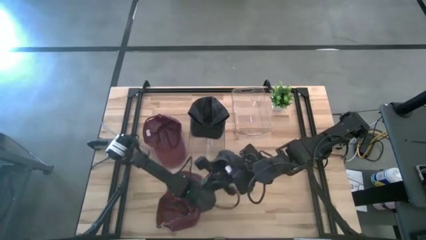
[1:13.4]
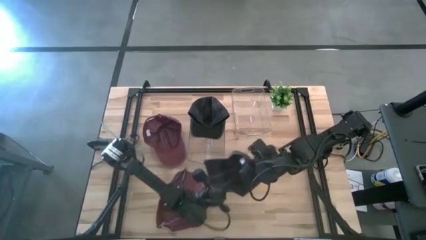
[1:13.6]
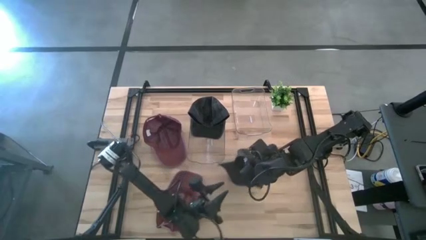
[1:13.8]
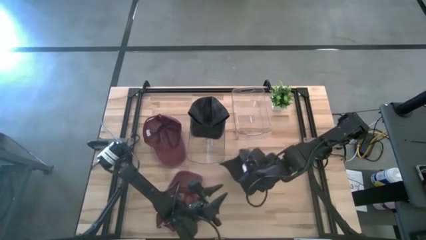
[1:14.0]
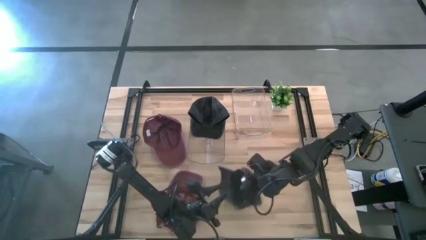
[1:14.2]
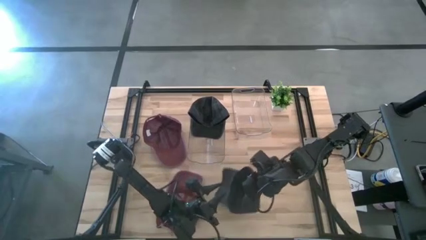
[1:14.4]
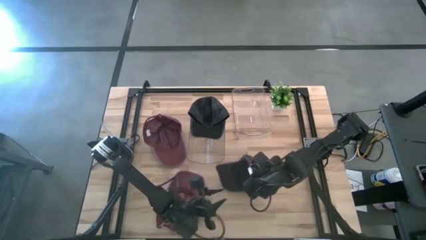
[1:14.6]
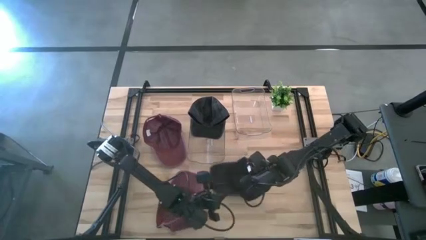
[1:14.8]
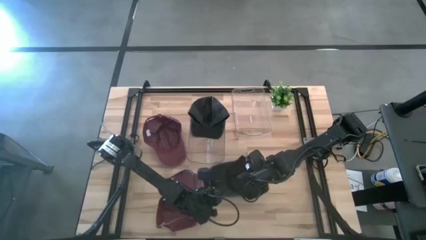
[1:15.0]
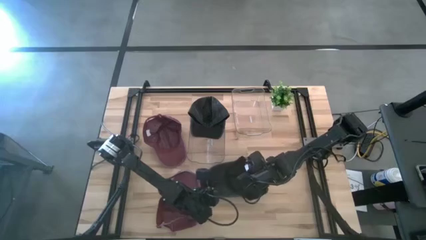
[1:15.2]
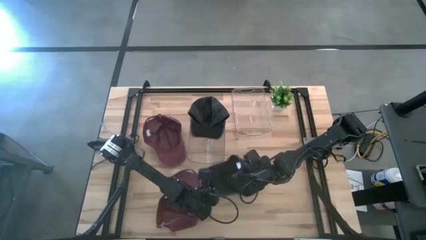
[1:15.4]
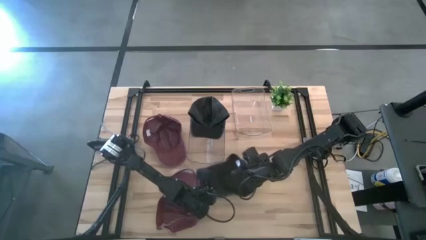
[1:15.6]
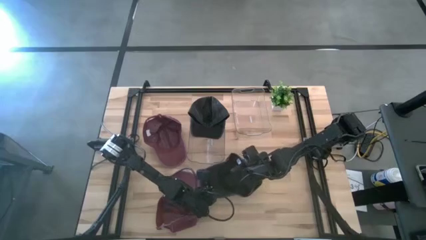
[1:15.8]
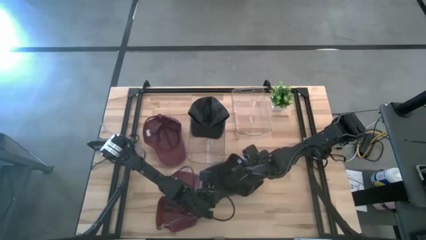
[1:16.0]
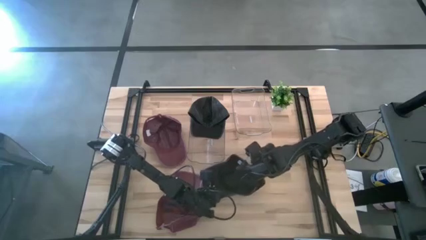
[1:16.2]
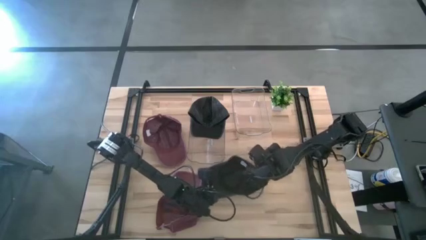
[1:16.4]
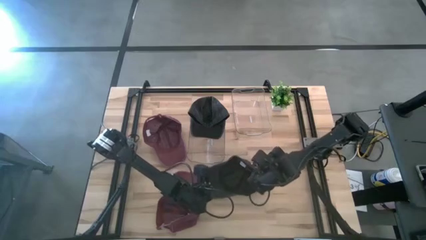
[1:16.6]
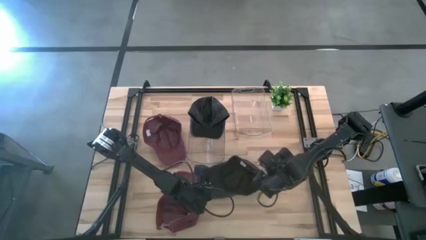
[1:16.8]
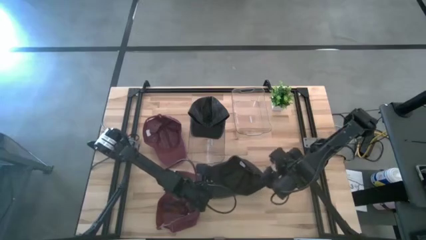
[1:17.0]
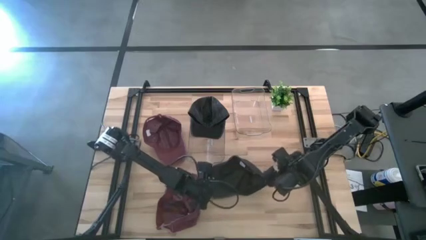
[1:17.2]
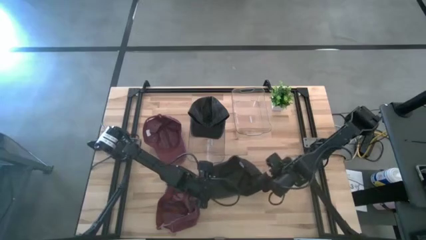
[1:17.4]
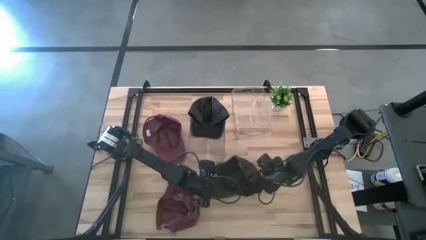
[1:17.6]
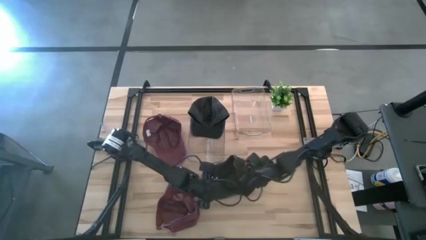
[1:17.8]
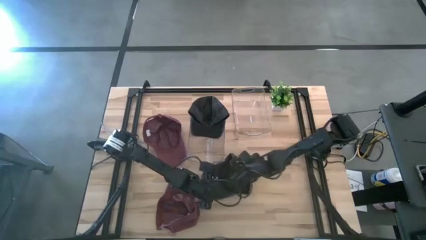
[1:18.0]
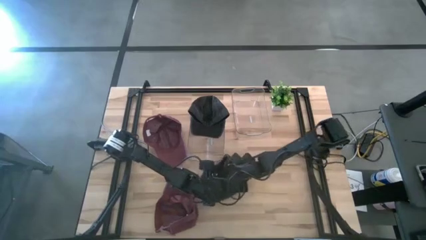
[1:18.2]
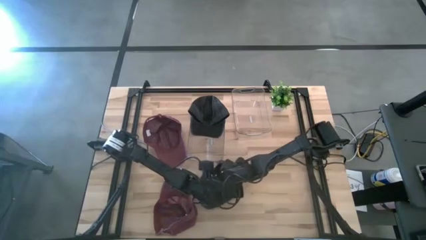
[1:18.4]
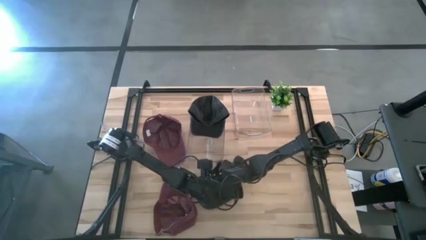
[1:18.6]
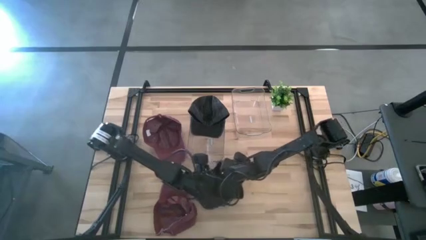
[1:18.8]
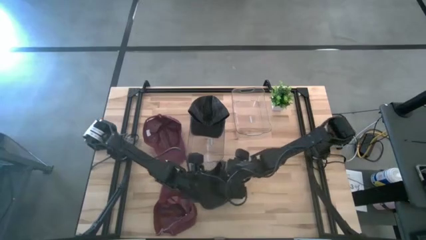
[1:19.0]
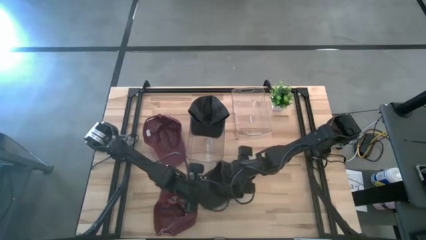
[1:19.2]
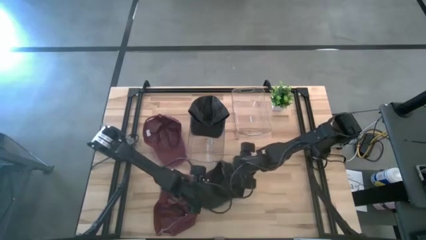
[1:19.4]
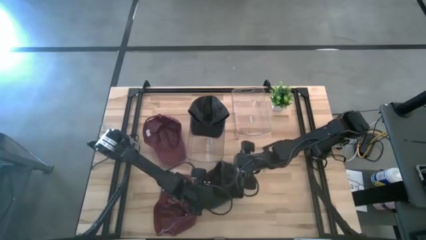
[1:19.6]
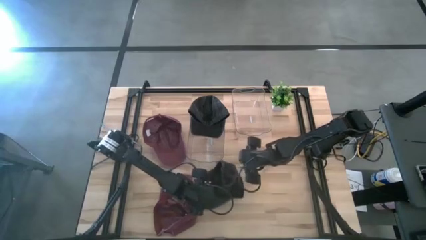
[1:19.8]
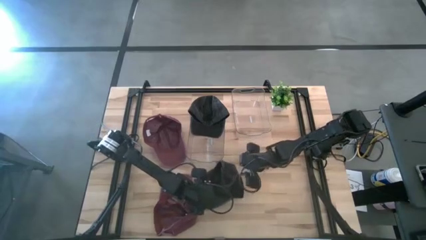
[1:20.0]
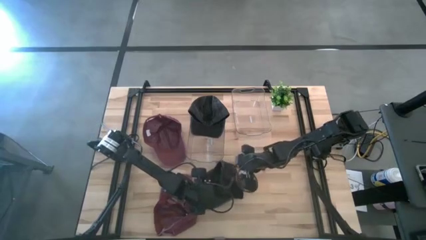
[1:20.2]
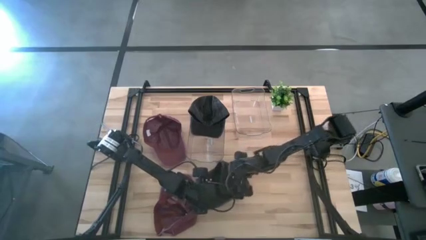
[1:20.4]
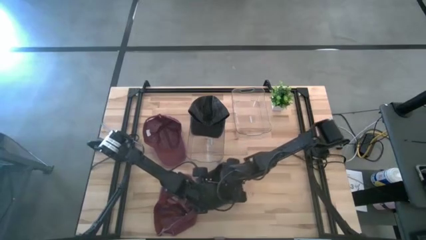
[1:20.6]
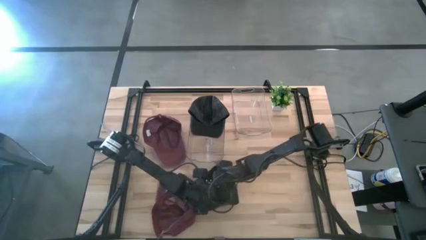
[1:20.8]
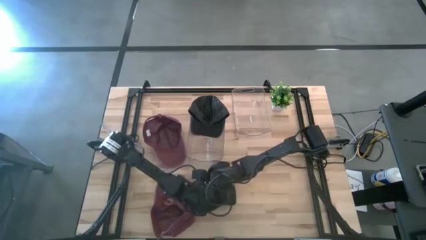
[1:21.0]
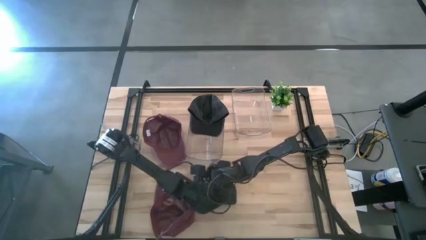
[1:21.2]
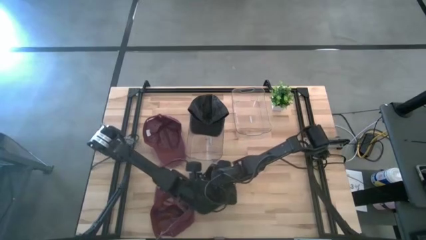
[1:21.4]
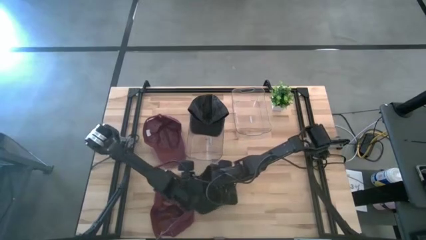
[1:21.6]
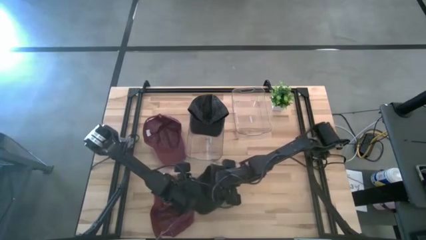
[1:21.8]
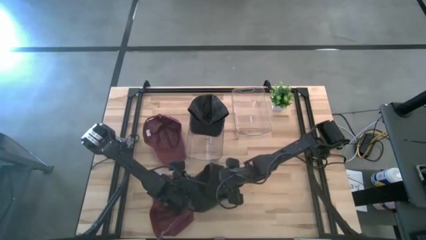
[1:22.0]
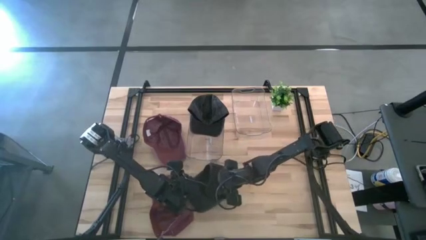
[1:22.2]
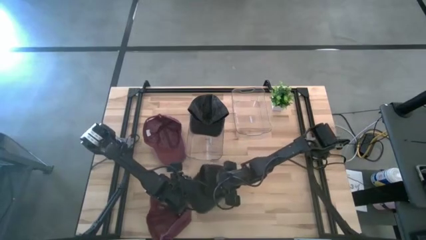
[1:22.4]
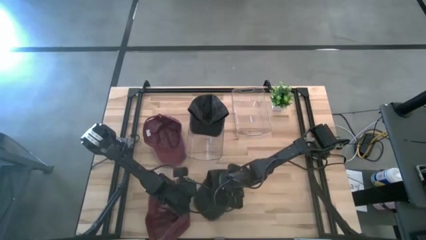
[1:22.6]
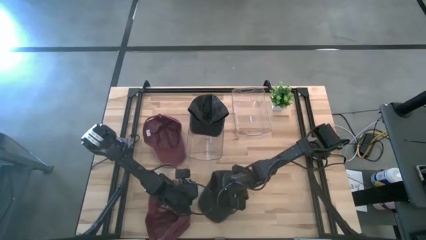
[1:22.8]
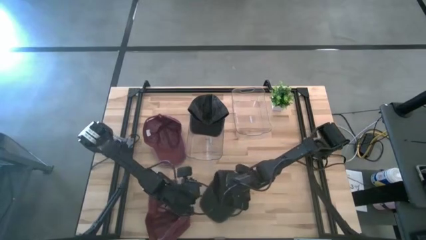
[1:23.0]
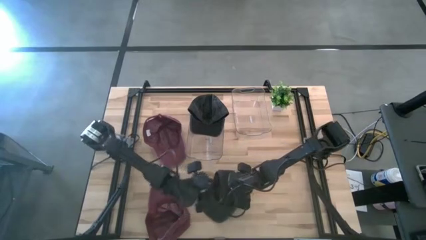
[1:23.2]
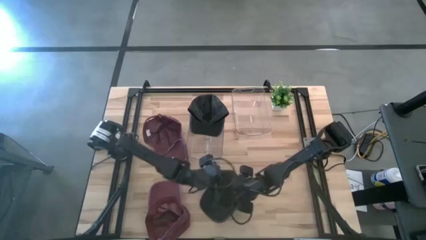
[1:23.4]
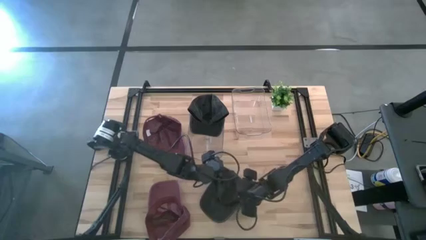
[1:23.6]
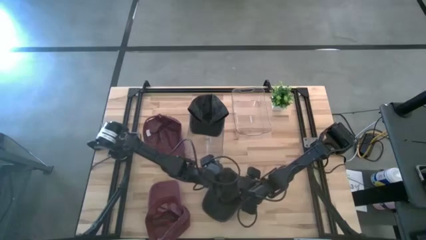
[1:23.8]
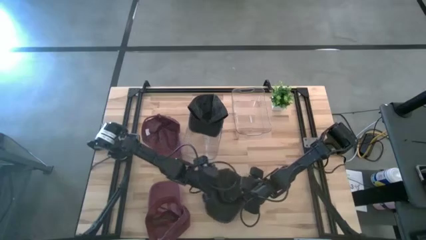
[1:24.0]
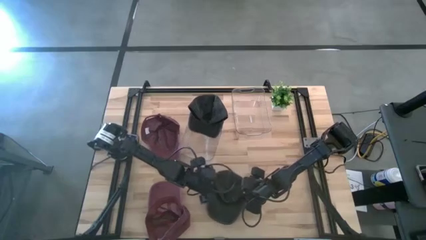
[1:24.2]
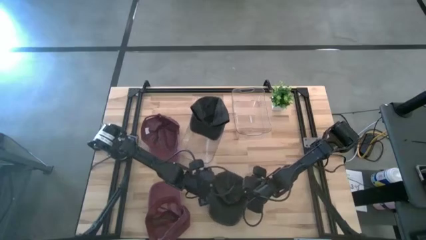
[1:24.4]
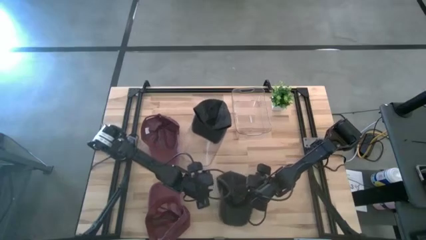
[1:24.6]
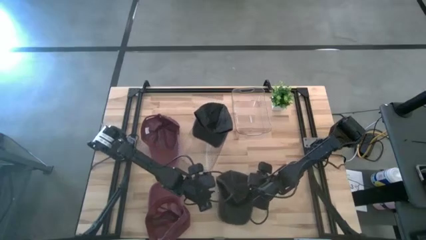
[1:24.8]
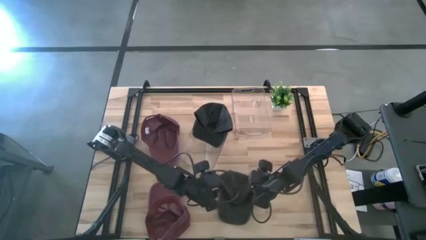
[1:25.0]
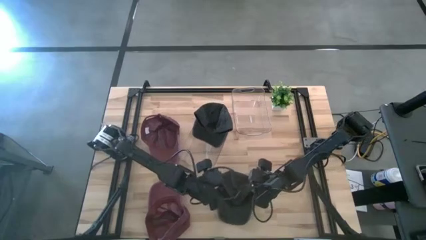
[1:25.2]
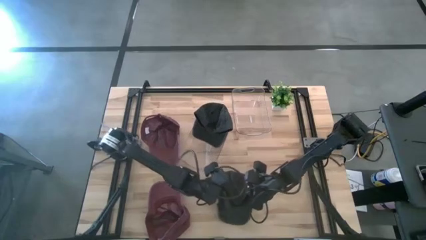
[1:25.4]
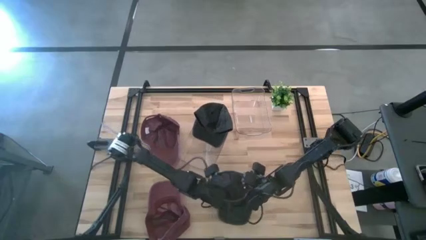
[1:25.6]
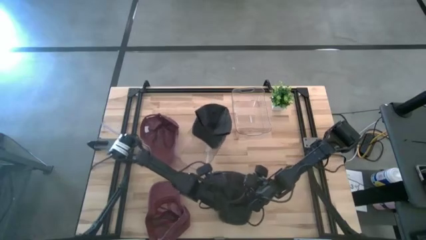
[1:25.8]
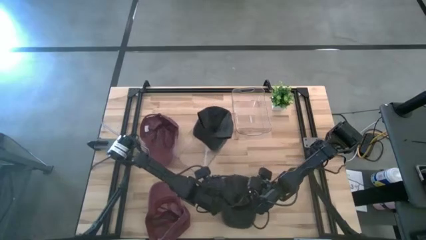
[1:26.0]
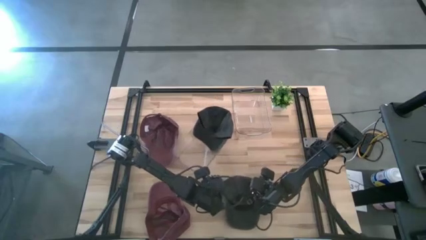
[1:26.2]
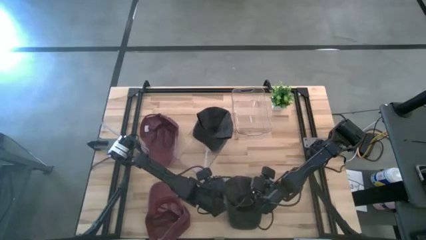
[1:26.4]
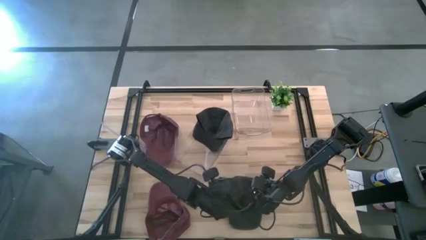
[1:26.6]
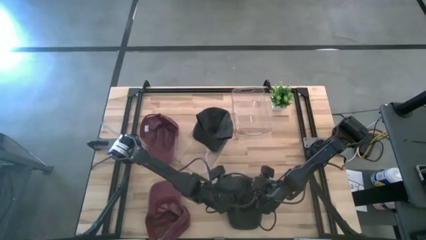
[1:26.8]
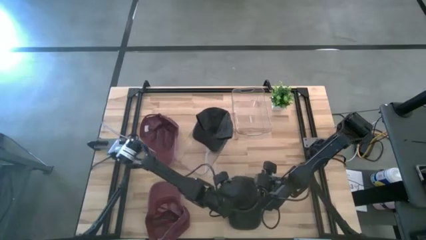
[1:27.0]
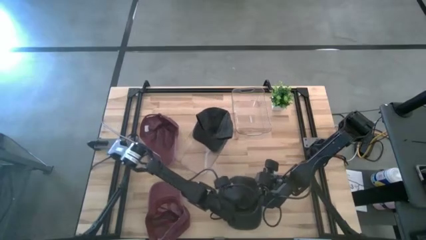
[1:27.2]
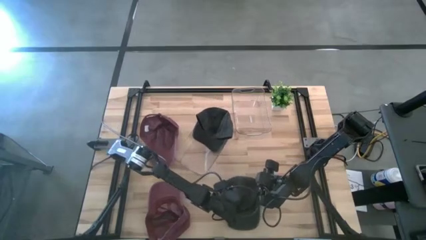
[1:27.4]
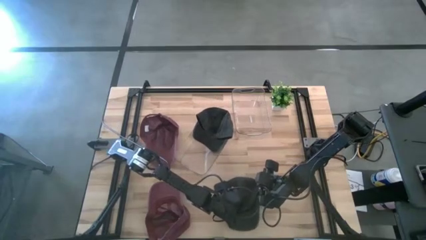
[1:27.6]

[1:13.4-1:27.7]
Task: Pick & Place hat
Put the black cap into the left transparent bin

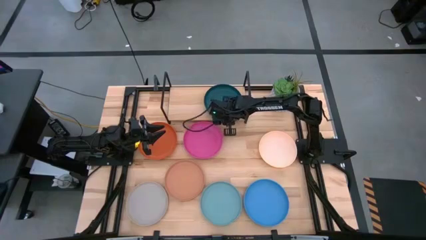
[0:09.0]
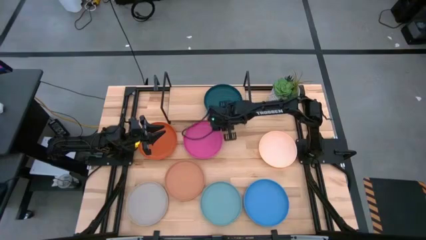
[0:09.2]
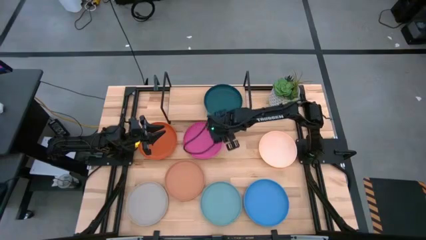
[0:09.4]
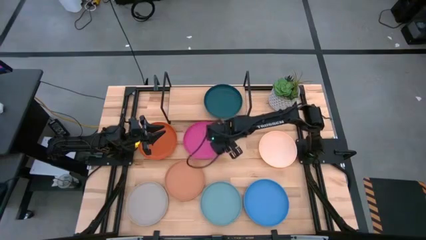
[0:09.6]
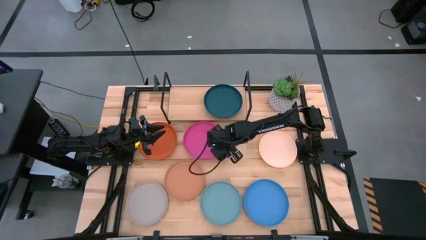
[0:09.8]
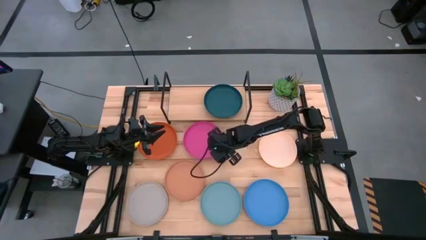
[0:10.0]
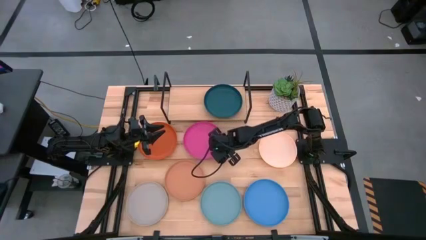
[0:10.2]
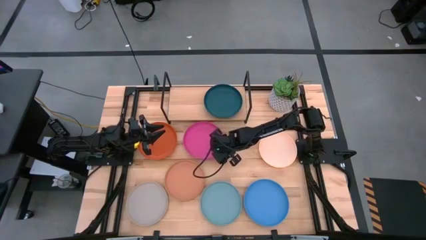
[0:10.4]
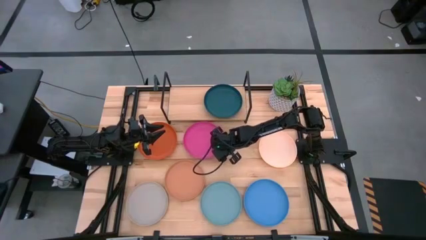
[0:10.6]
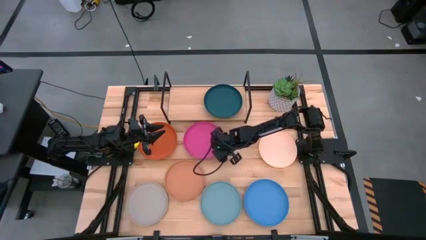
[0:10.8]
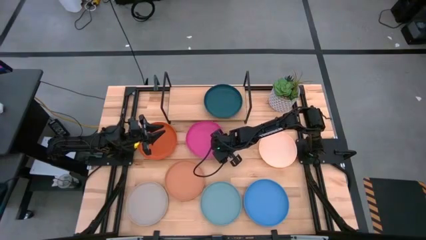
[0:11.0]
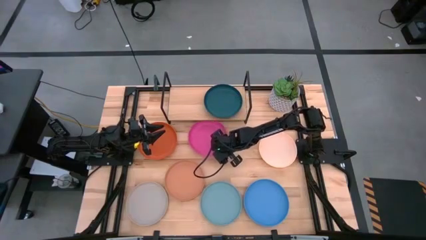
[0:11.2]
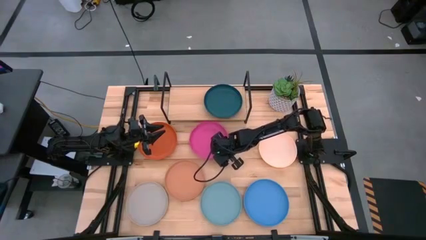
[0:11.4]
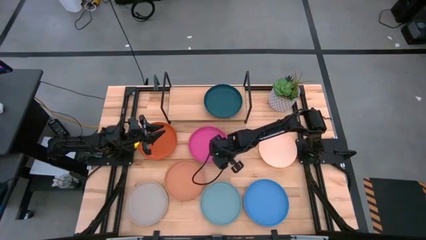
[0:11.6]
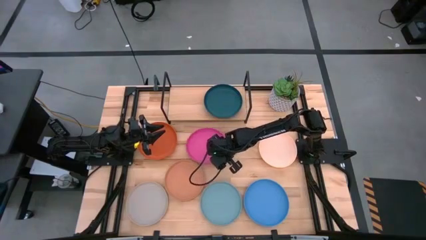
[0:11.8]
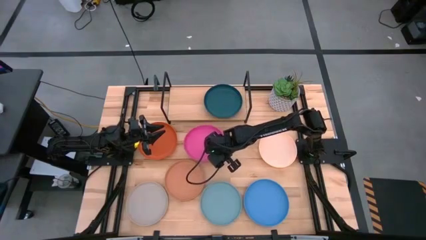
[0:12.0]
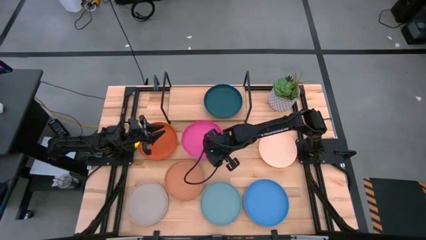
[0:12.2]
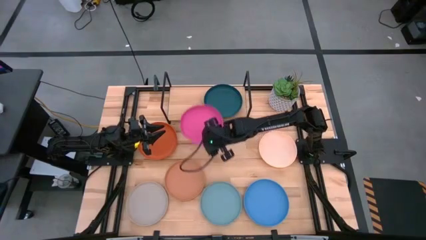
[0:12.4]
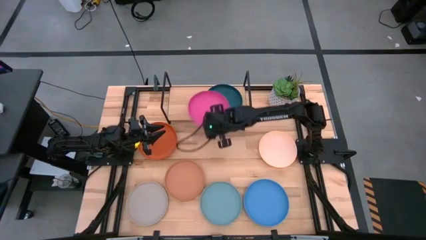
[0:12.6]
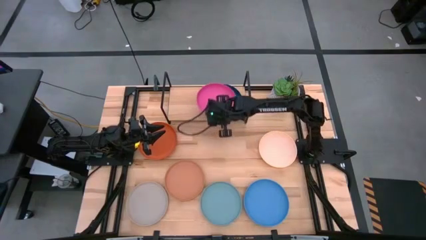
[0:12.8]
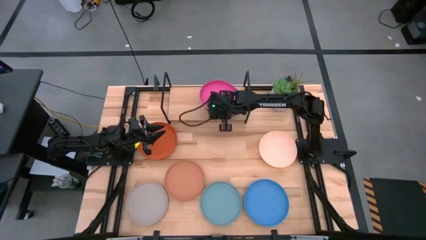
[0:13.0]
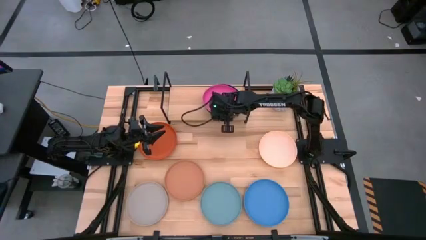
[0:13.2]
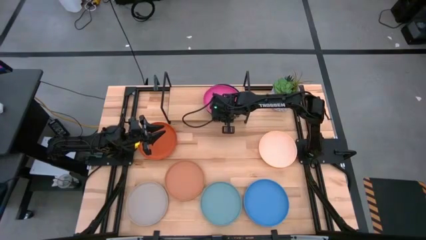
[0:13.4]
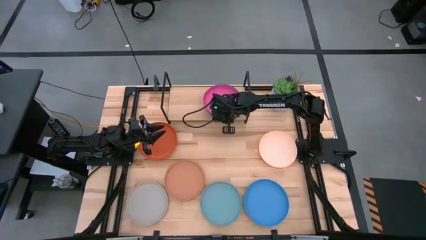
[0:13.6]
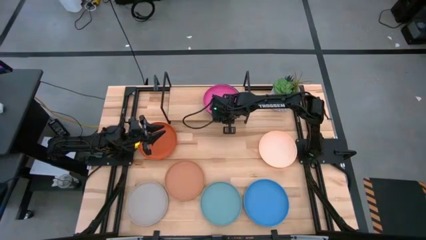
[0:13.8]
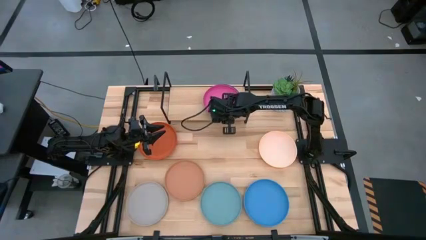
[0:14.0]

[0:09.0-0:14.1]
Task: Place and stack plates onto a shelf
Stack the pink plate on top of the dark blue plate on the shelf
